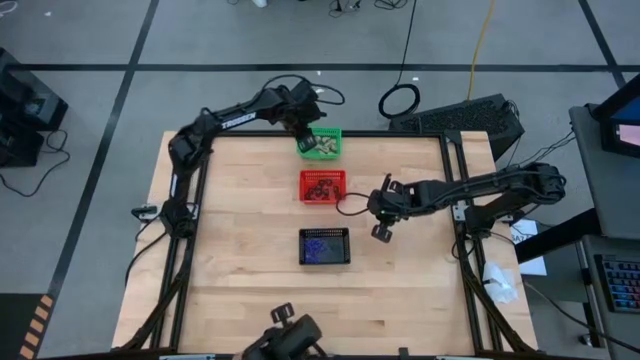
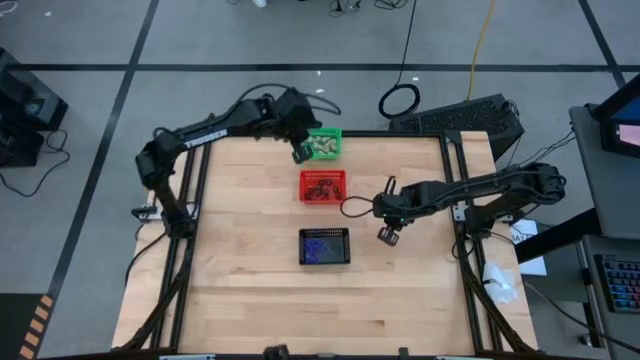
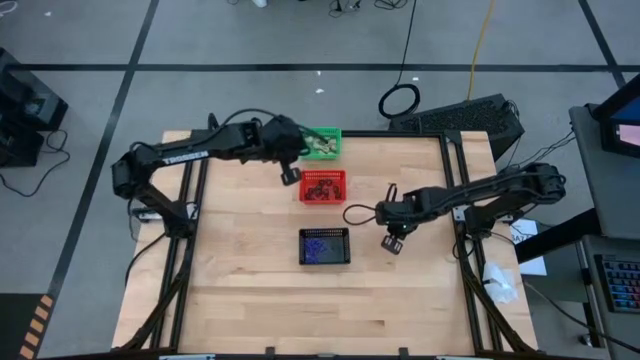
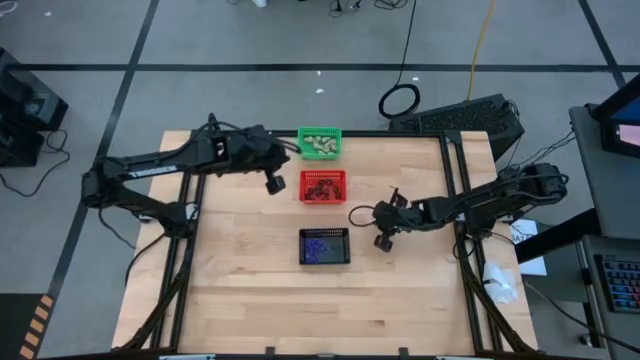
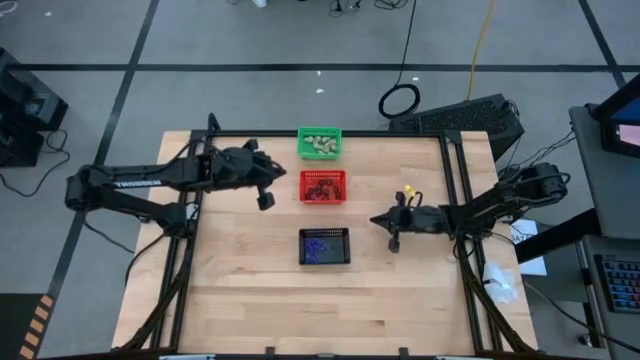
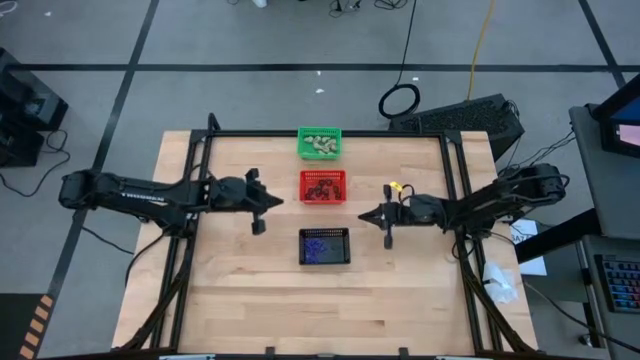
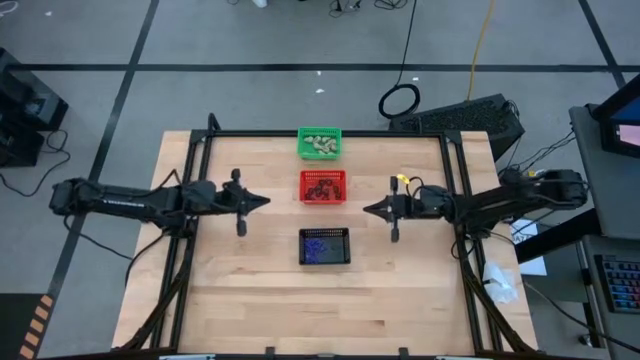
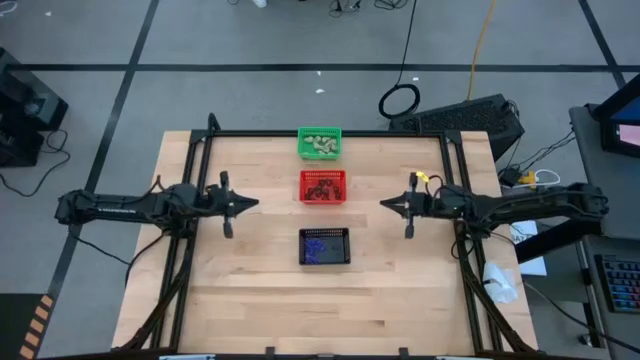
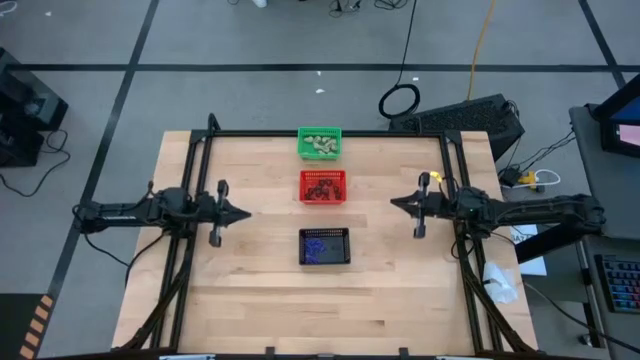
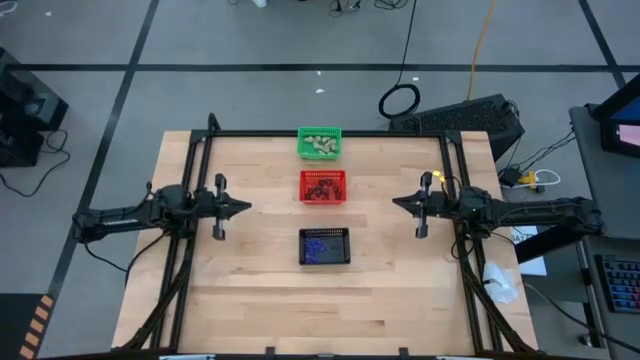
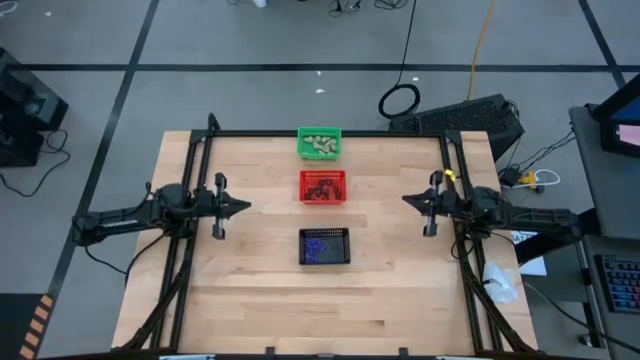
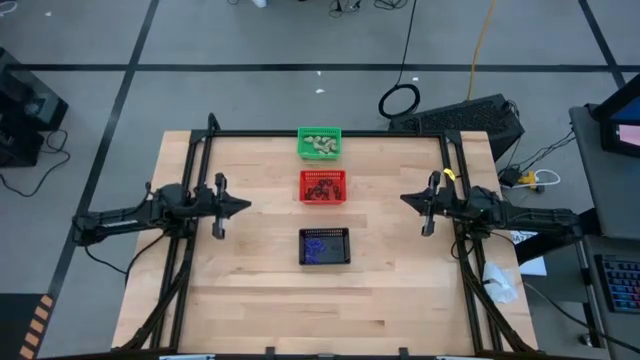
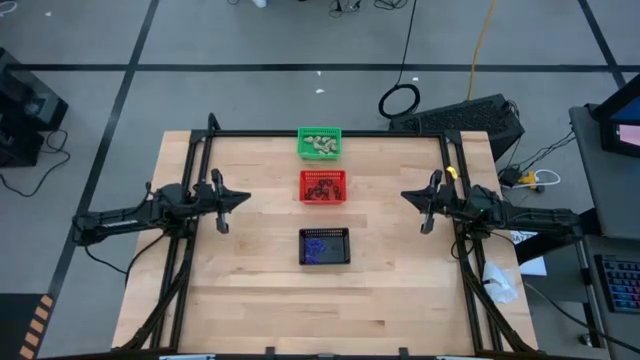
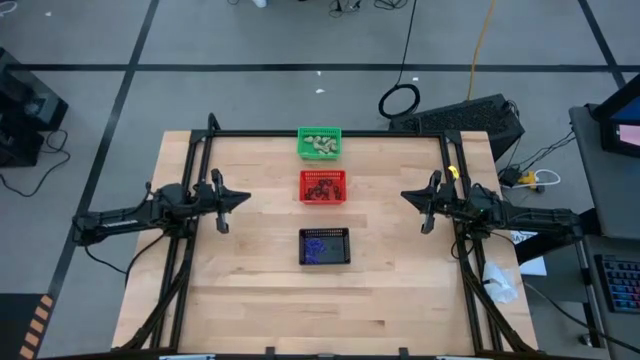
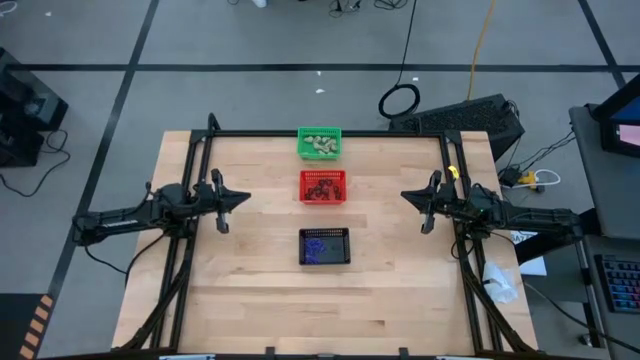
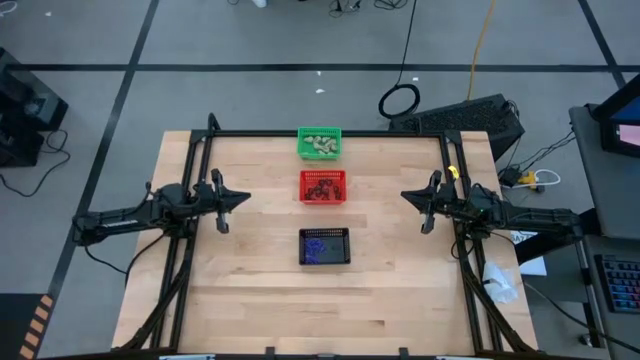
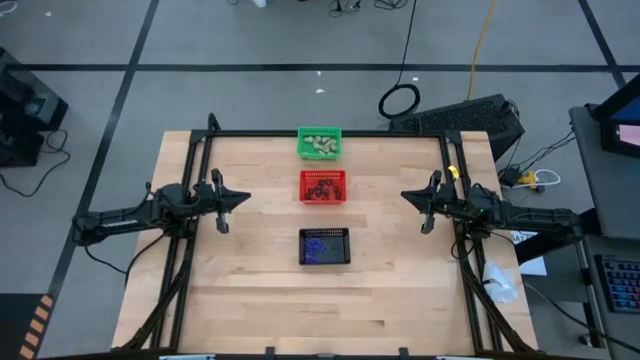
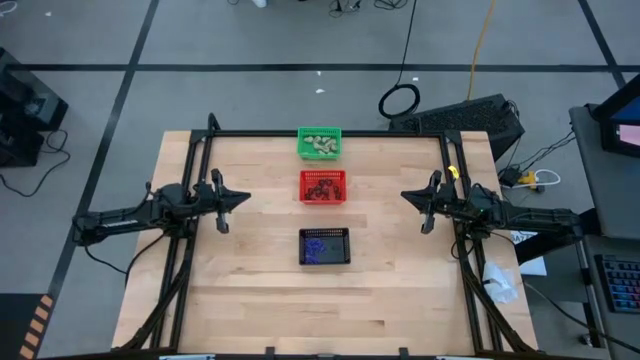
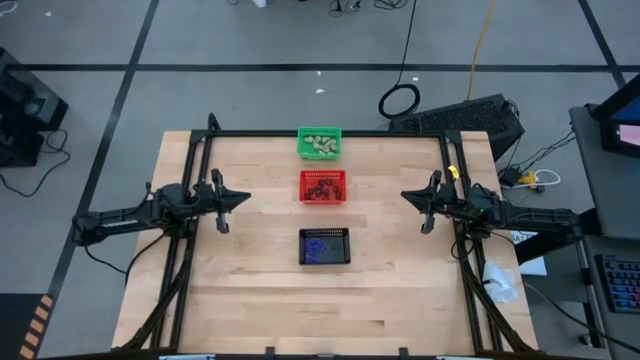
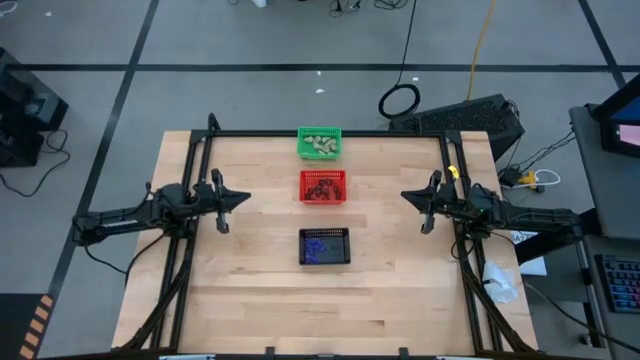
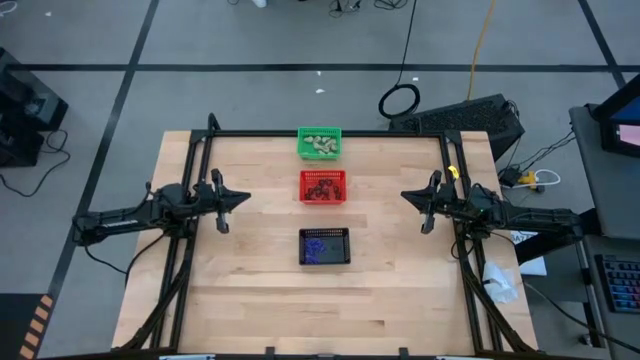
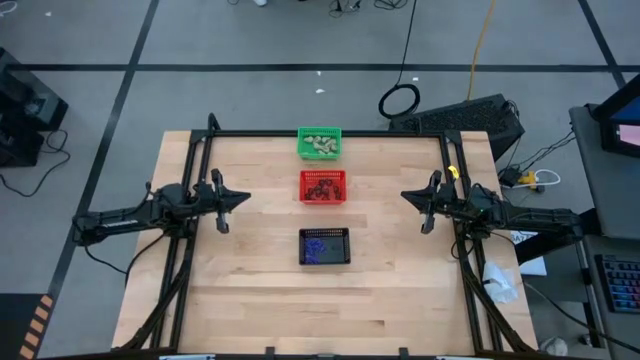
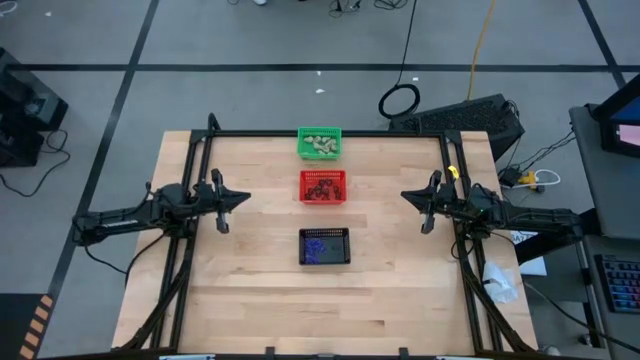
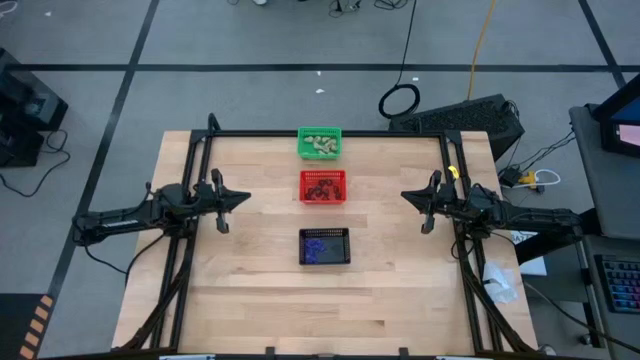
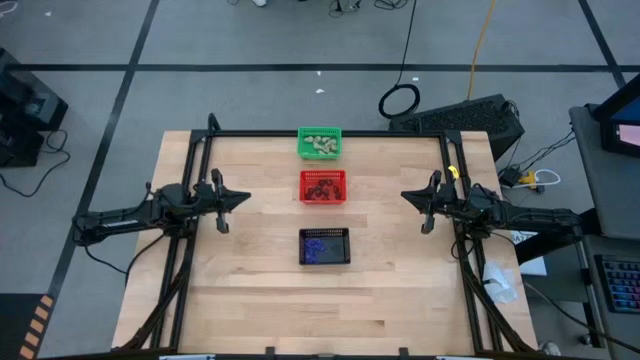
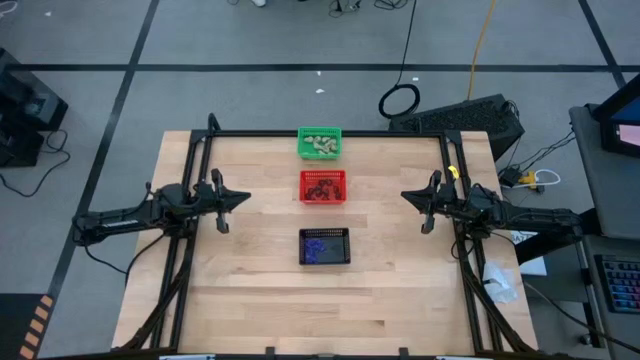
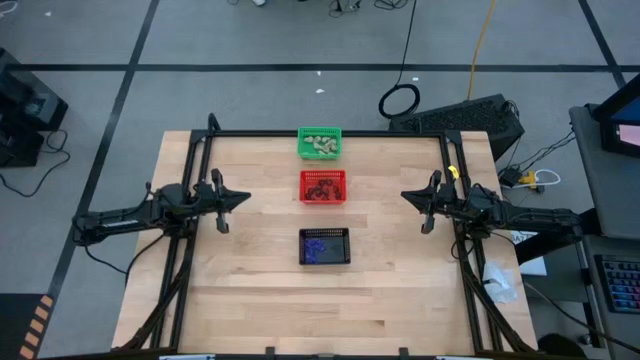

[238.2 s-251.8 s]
Task: Sort Halloween decoration
Return to Home Position

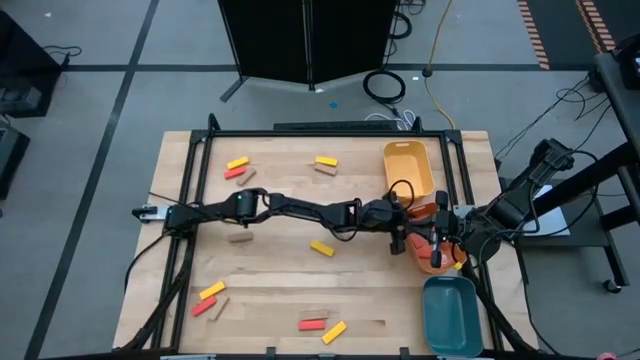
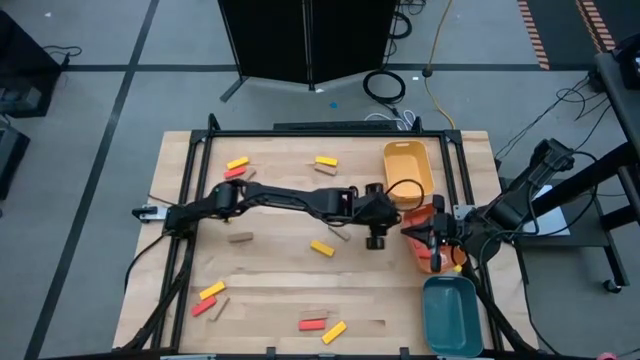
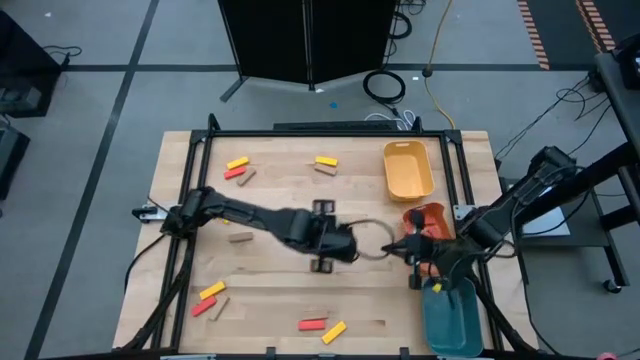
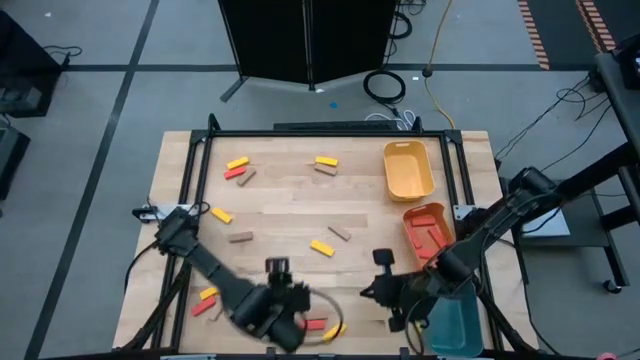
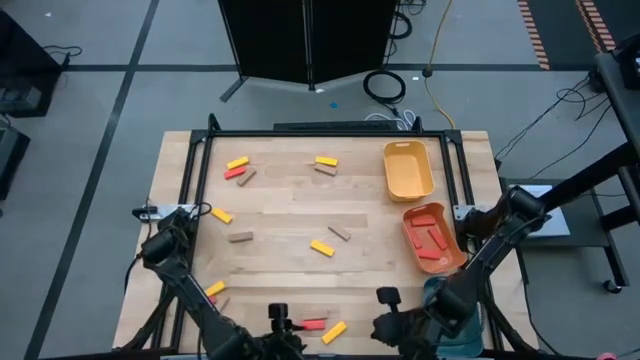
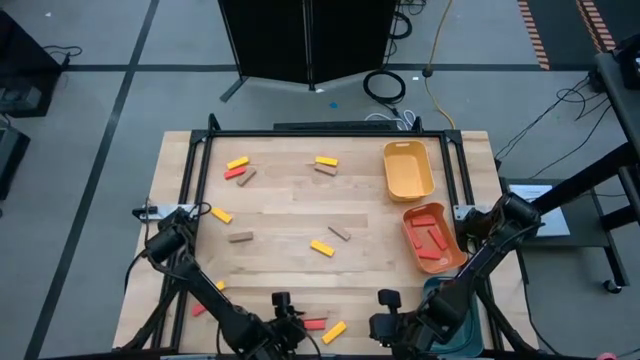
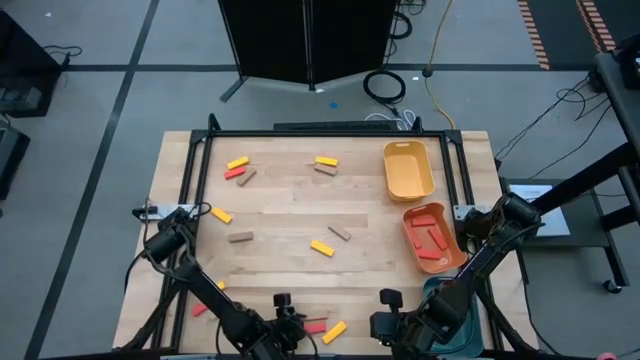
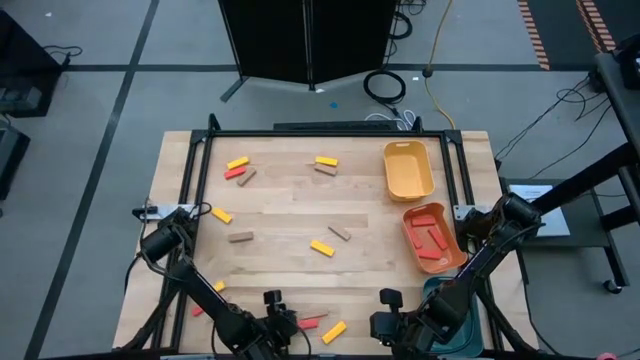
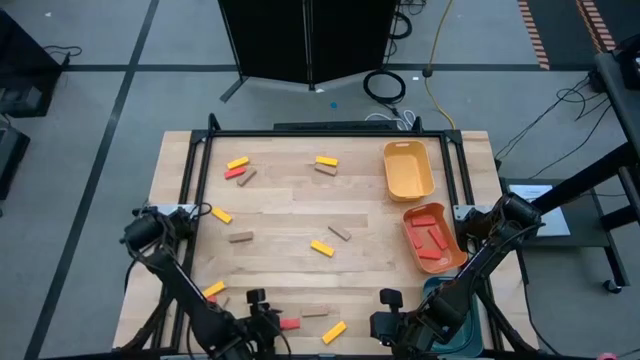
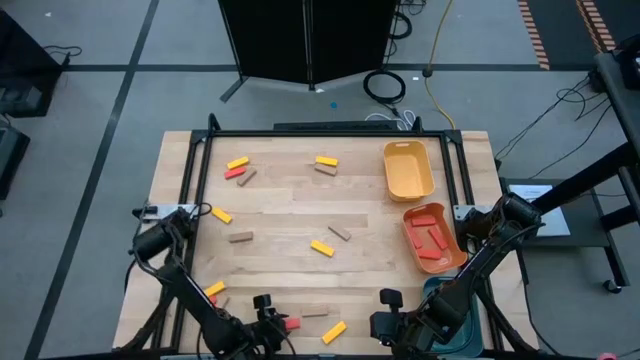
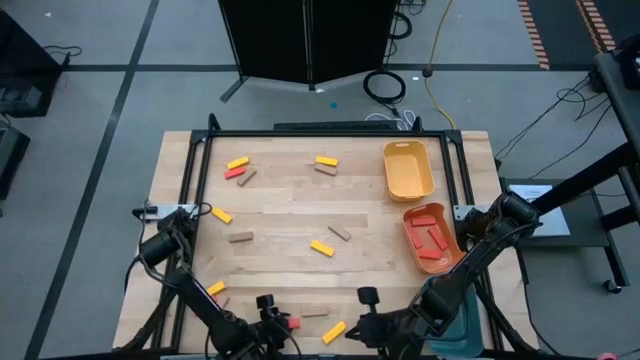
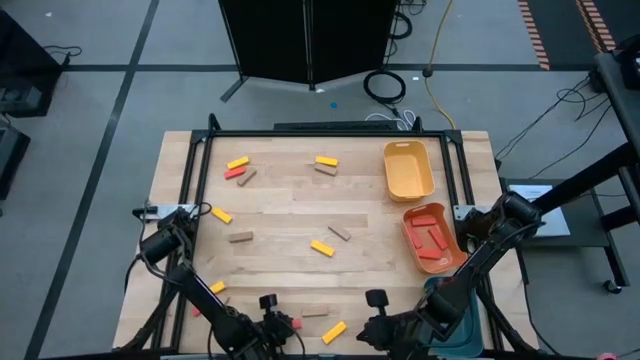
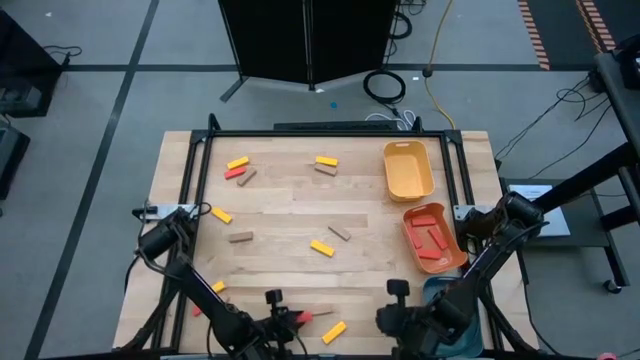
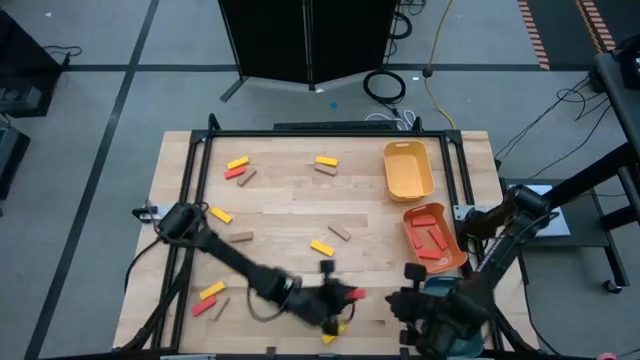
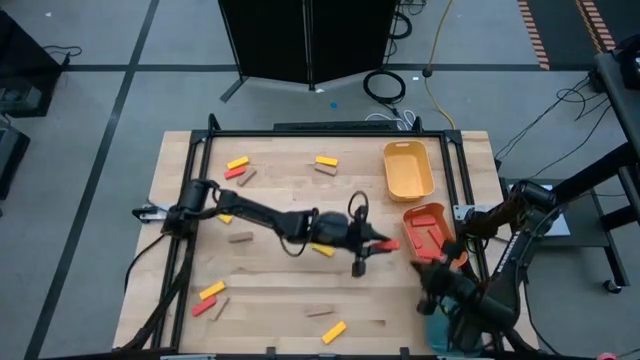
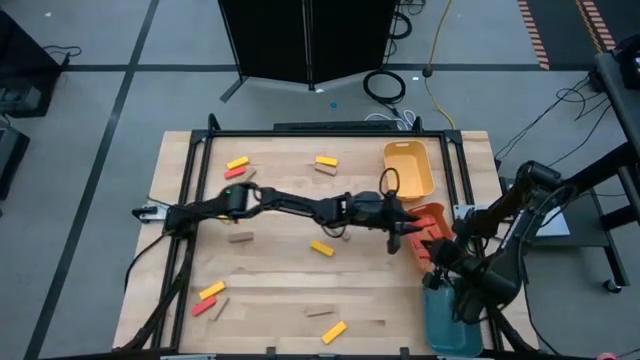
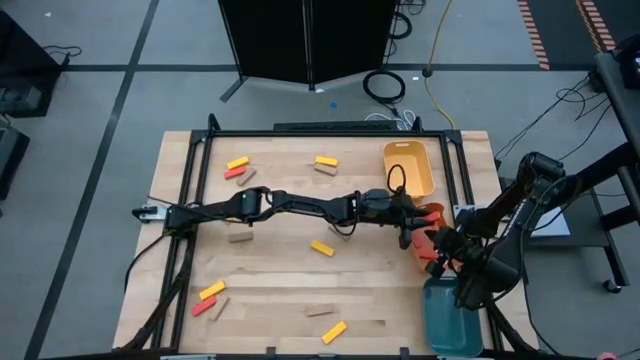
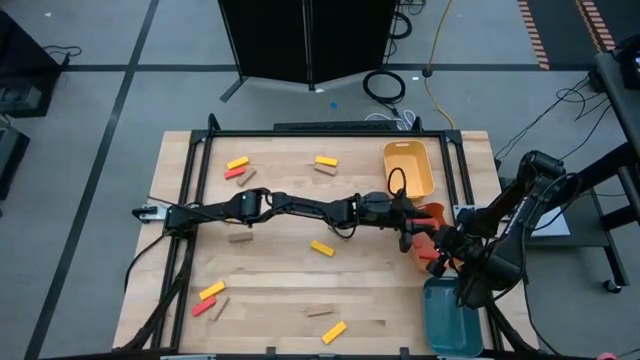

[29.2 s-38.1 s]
Task: Sort blocks
Put the red block into the orange bin
